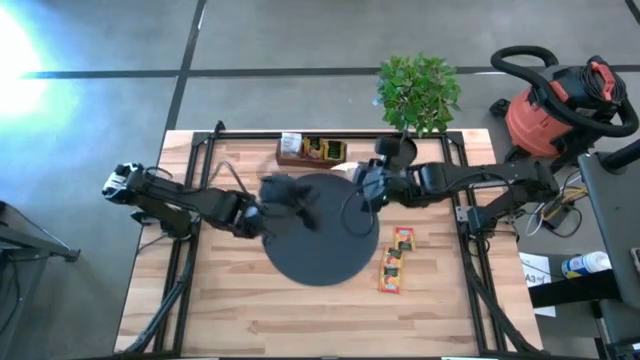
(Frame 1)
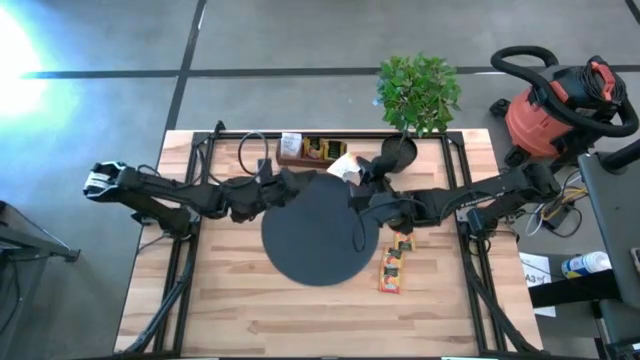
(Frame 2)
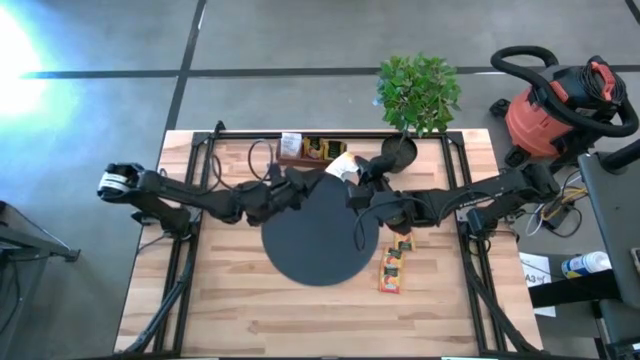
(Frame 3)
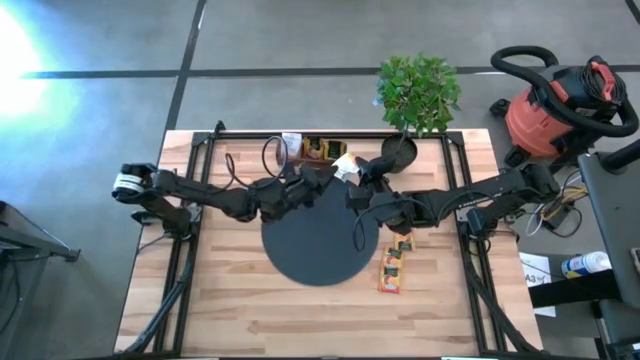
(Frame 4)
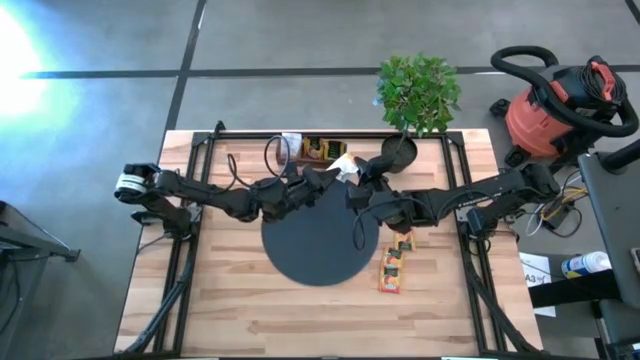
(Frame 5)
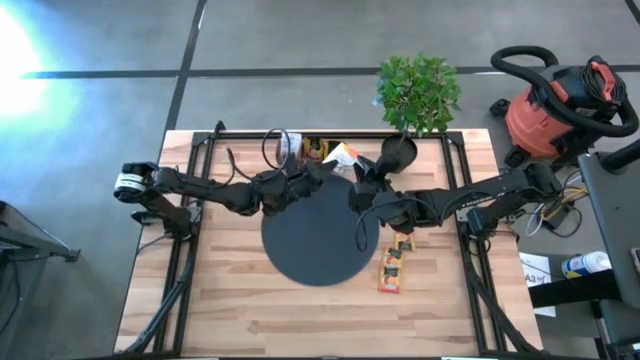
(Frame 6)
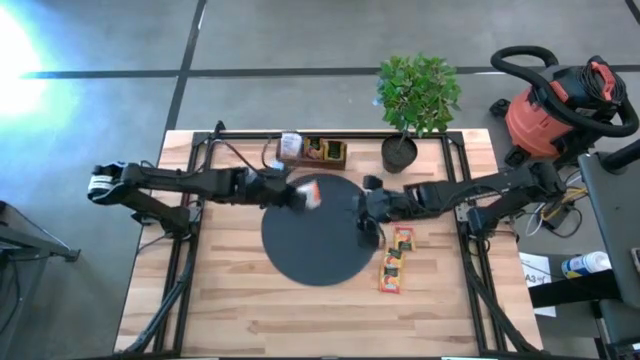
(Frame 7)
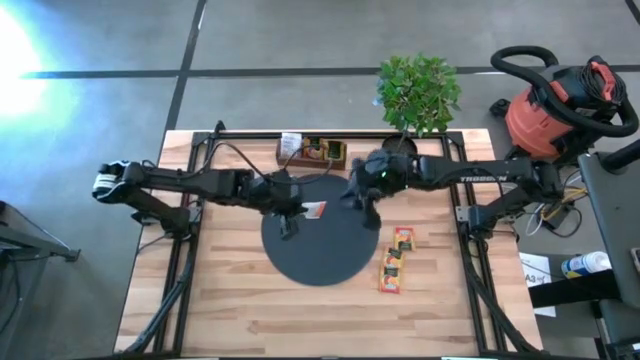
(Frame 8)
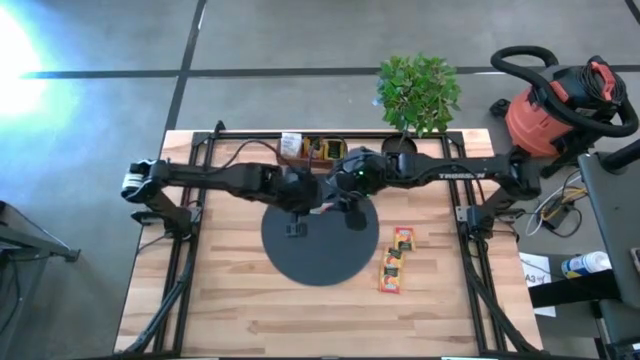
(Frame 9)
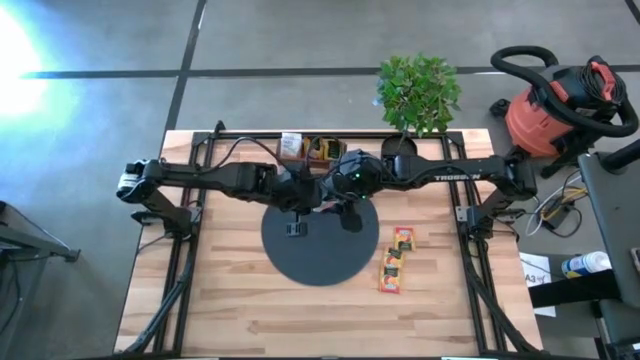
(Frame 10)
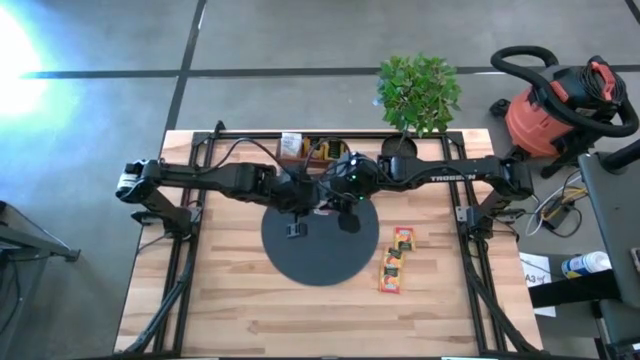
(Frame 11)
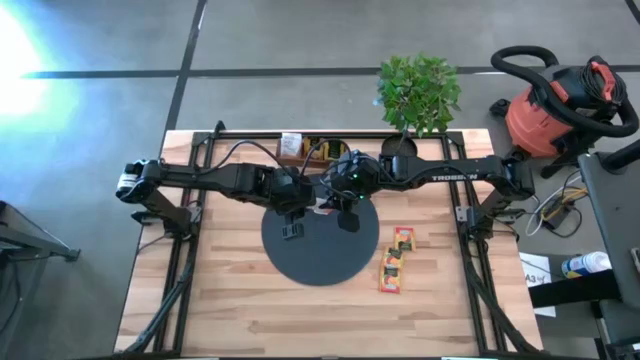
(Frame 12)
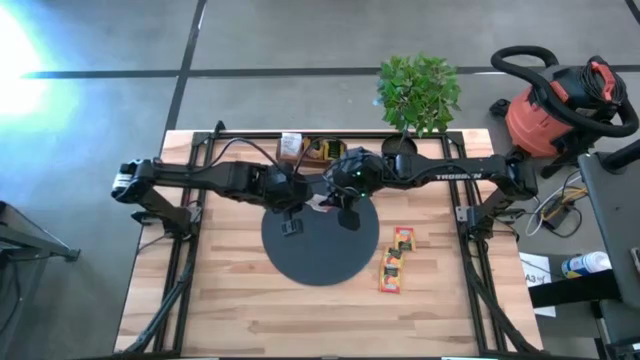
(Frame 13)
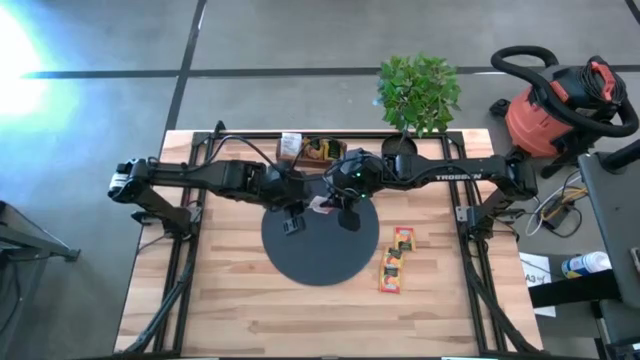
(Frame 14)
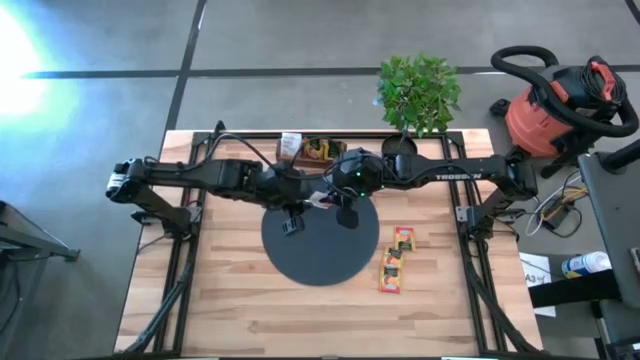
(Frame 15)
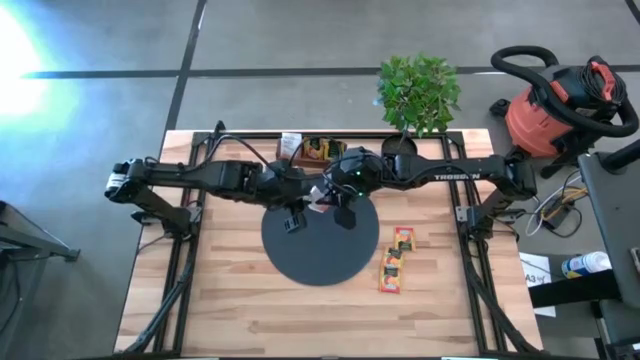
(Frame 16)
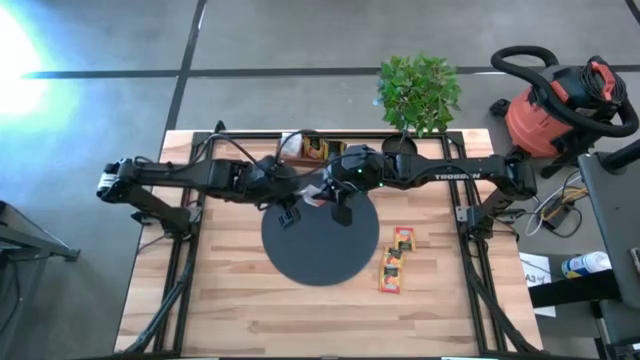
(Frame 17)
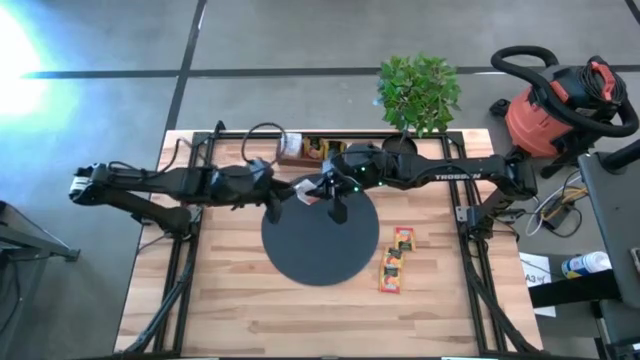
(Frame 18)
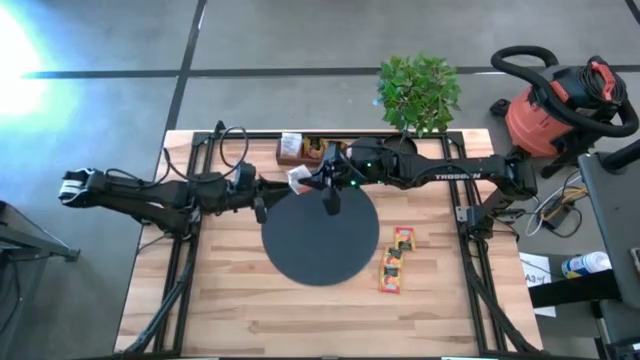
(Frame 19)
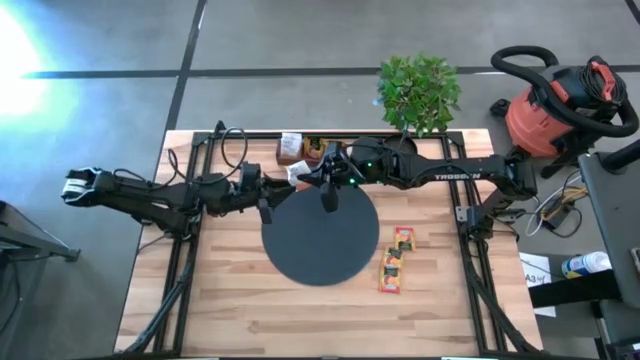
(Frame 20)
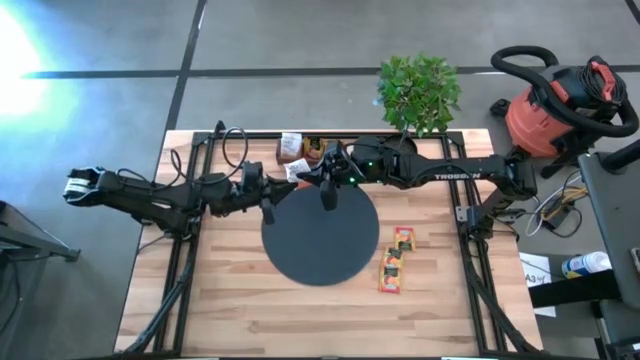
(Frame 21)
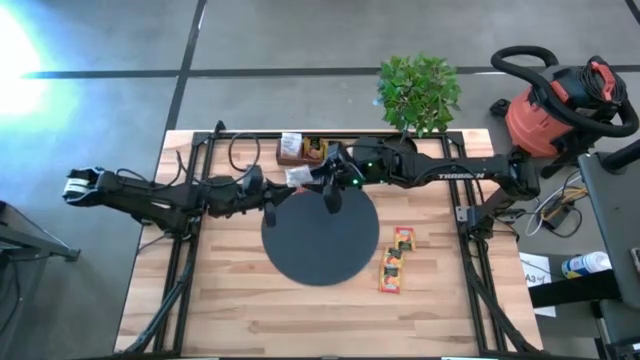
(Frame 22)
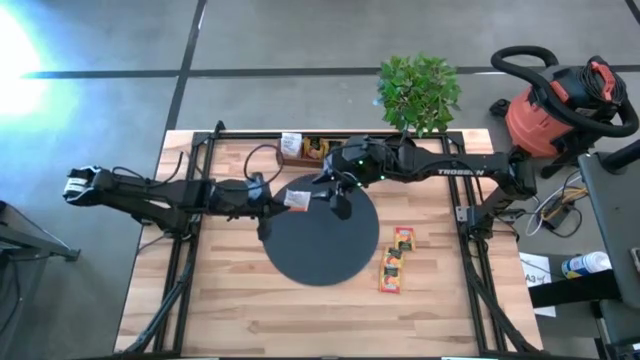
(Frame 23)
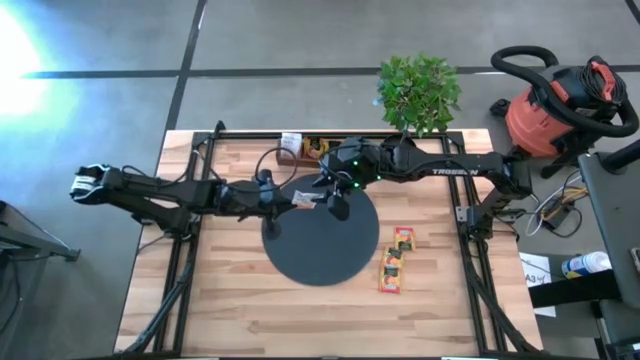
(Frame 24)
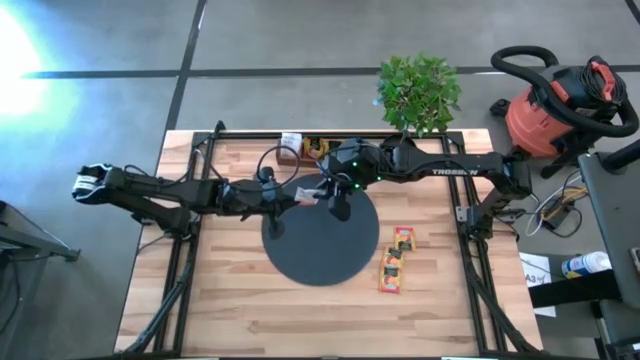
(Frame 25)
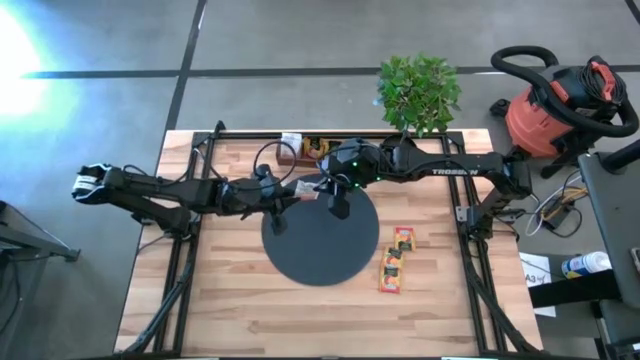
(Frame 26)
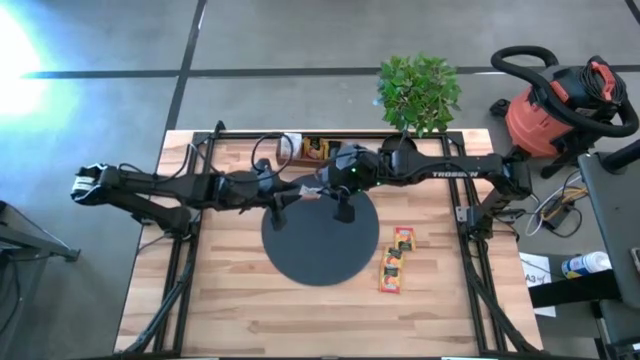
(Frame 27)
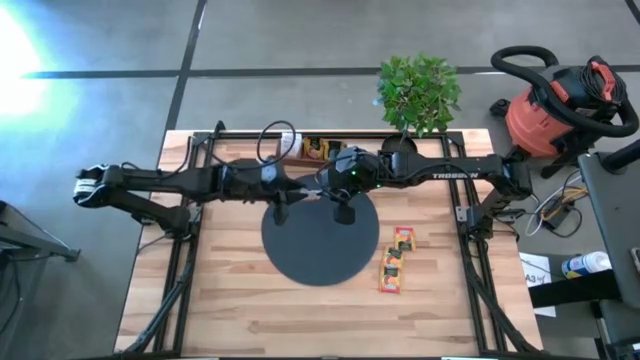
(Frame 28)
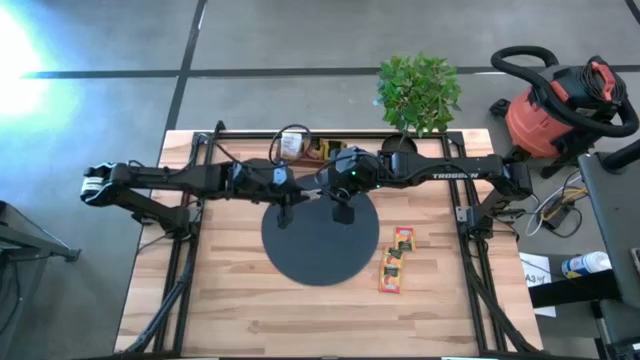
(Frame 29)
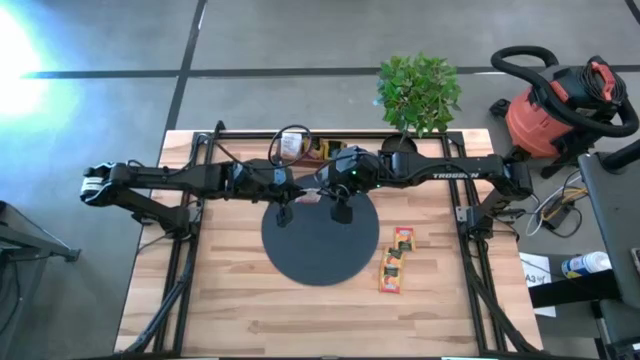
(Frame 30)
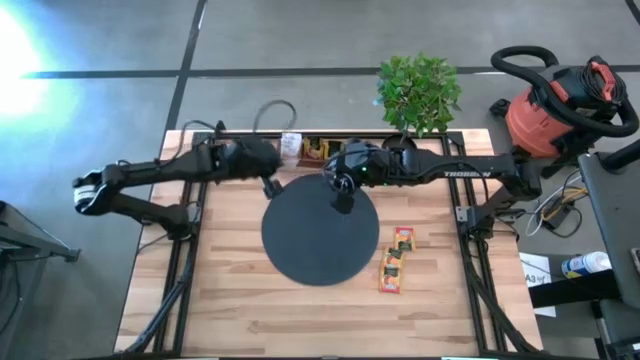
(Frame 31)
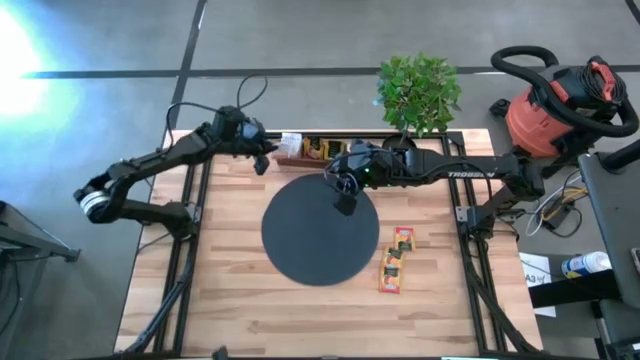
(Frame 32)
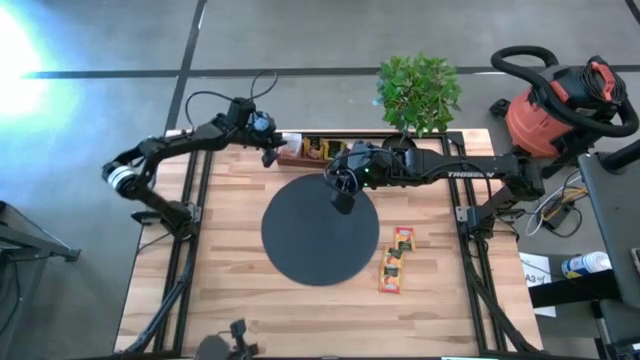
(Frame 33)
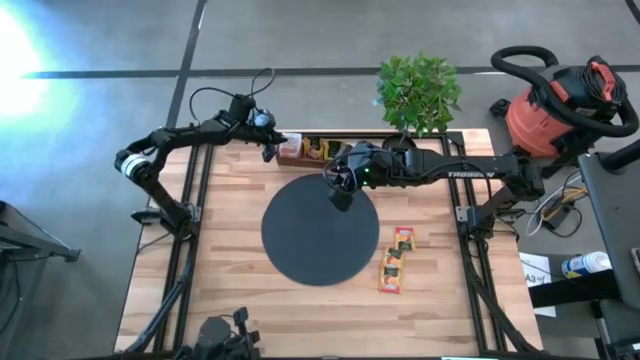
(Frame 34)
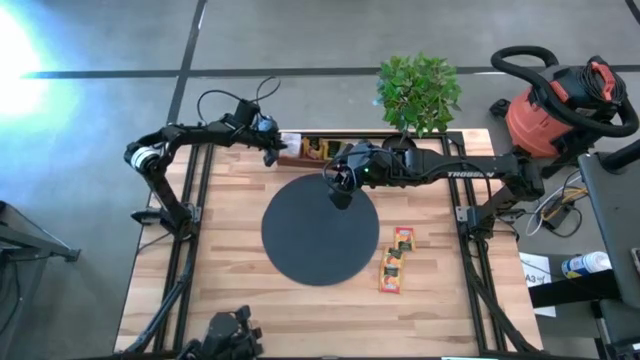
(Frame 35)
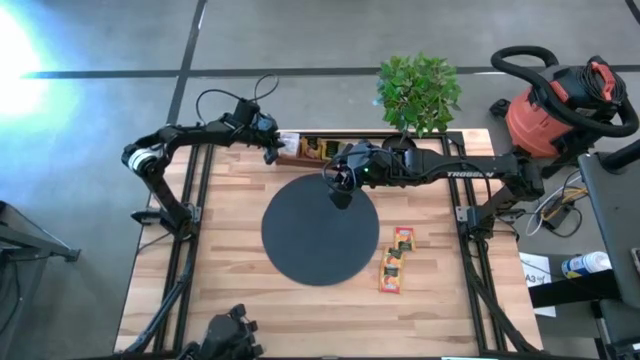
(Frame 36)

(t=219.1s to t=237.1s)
Task: Pick & Place Tea
Put the white tea bag into the left section of the brown wooden organizer
